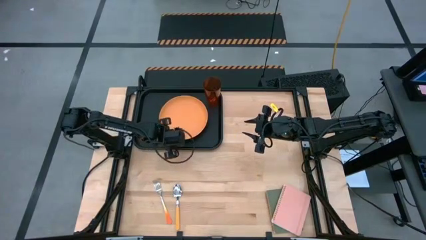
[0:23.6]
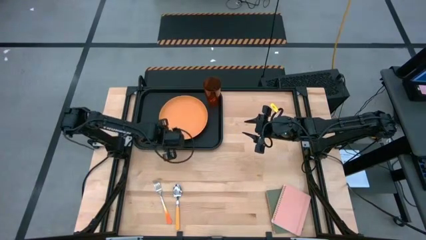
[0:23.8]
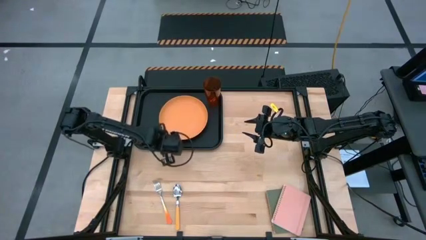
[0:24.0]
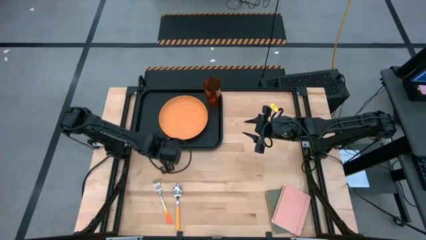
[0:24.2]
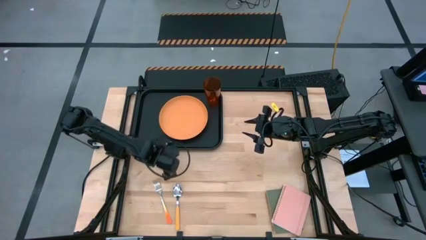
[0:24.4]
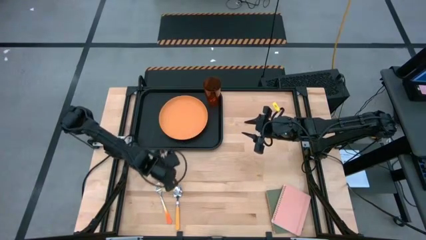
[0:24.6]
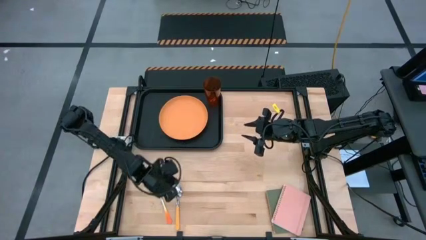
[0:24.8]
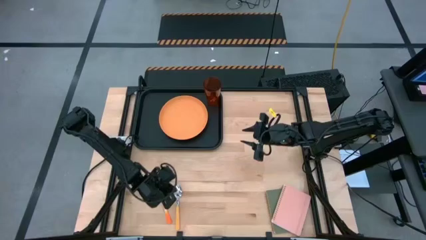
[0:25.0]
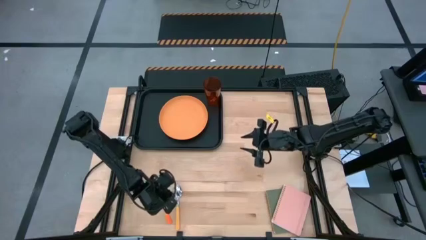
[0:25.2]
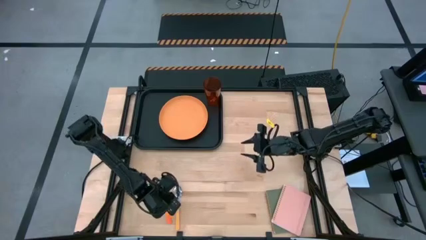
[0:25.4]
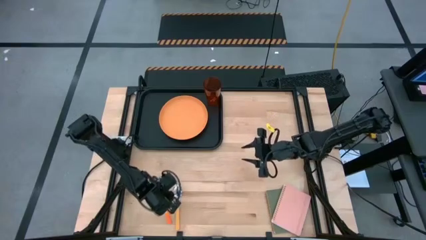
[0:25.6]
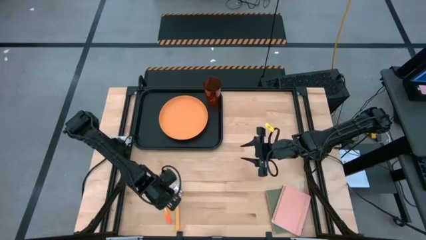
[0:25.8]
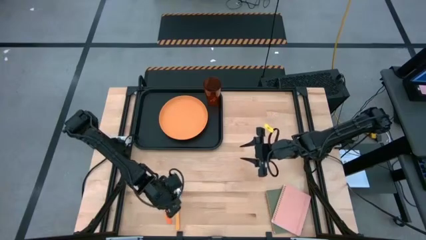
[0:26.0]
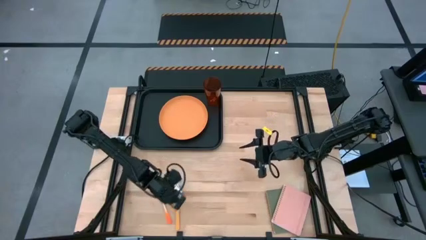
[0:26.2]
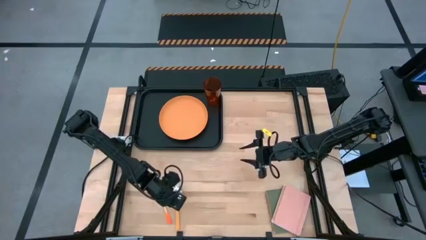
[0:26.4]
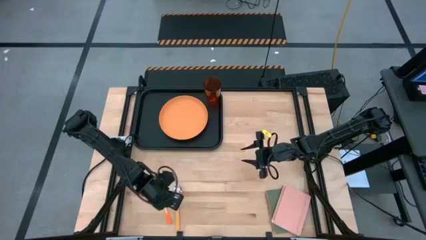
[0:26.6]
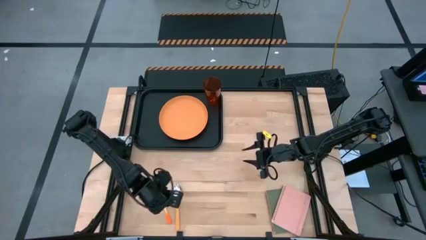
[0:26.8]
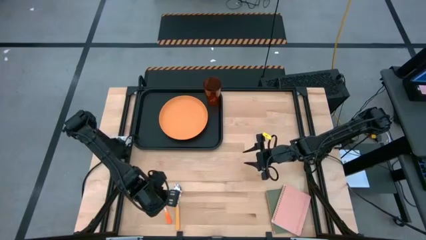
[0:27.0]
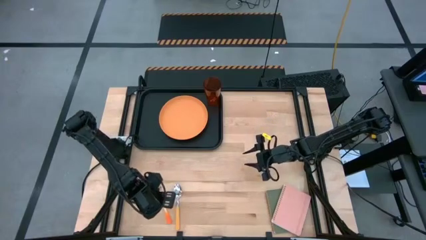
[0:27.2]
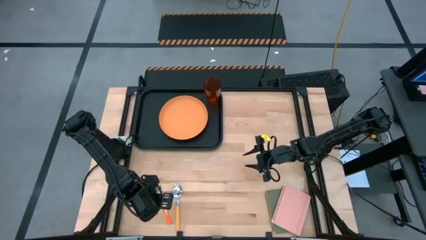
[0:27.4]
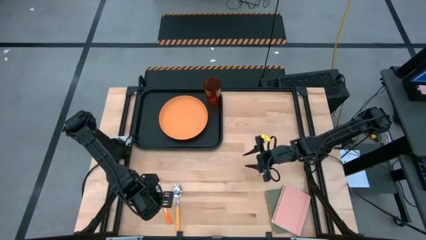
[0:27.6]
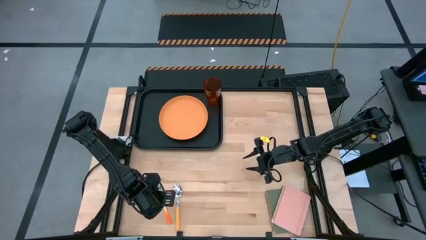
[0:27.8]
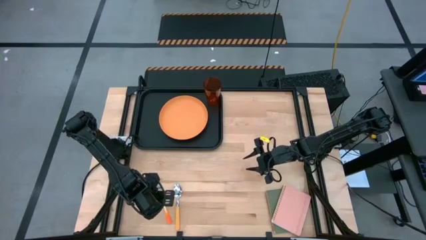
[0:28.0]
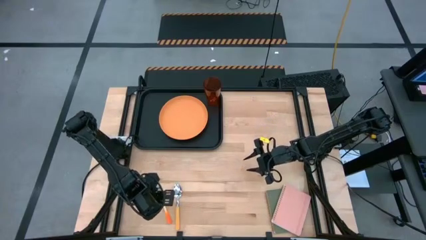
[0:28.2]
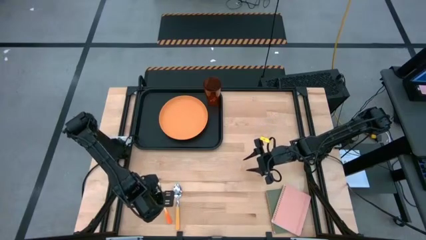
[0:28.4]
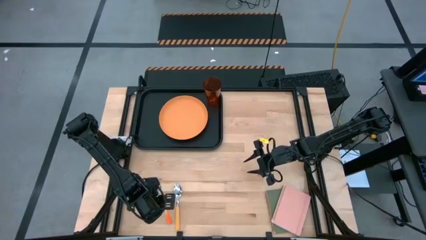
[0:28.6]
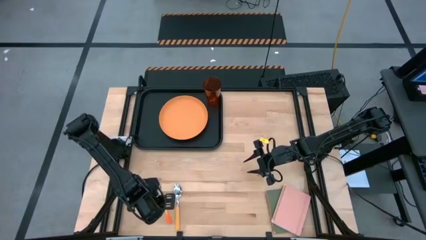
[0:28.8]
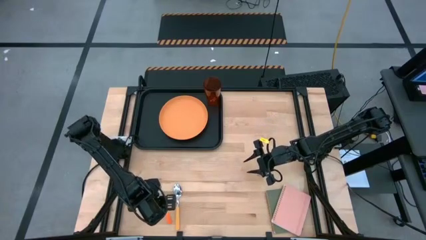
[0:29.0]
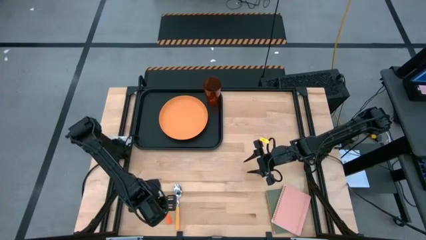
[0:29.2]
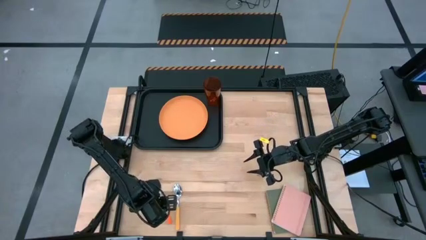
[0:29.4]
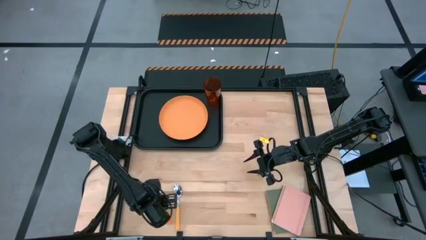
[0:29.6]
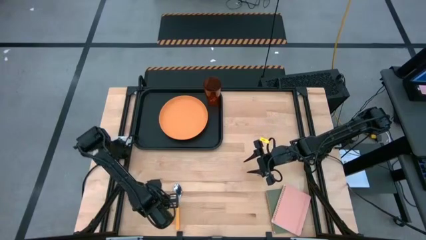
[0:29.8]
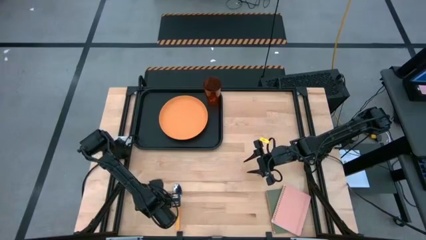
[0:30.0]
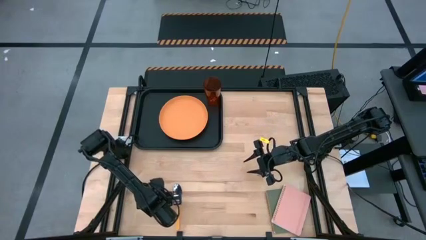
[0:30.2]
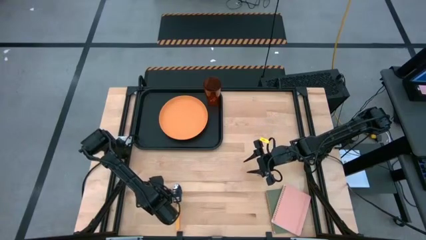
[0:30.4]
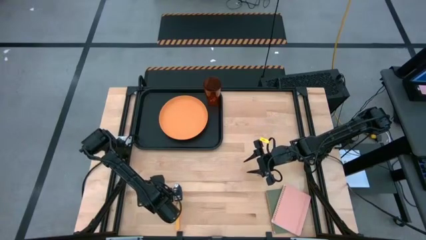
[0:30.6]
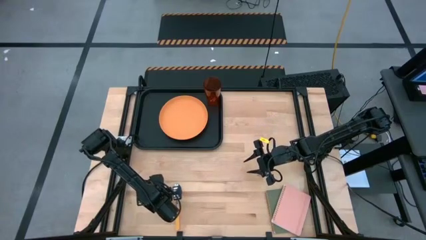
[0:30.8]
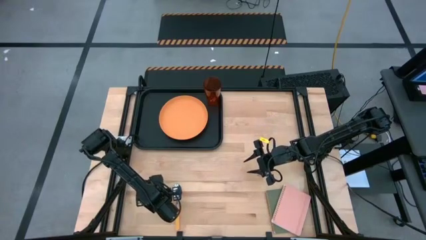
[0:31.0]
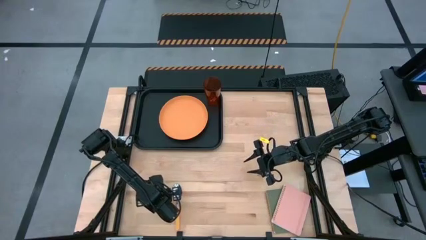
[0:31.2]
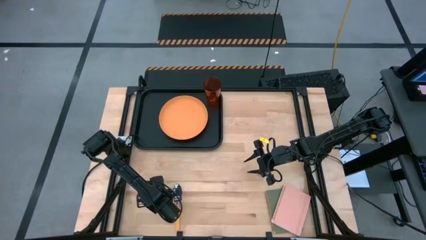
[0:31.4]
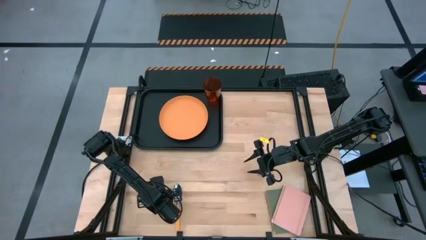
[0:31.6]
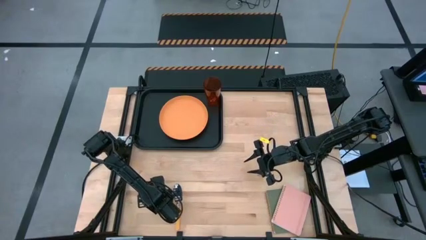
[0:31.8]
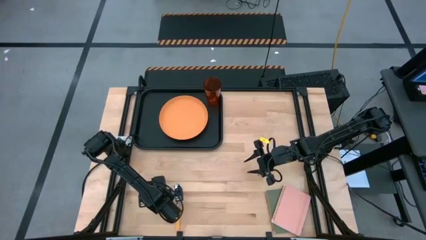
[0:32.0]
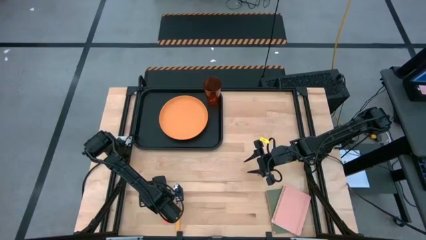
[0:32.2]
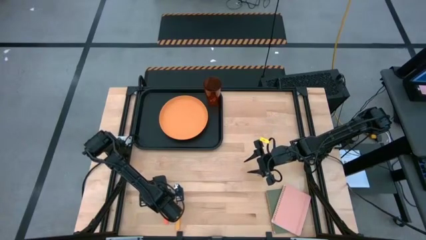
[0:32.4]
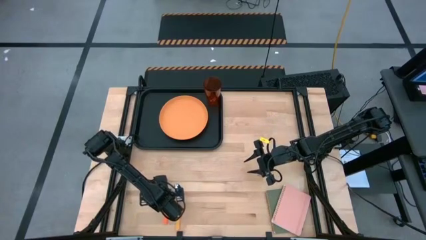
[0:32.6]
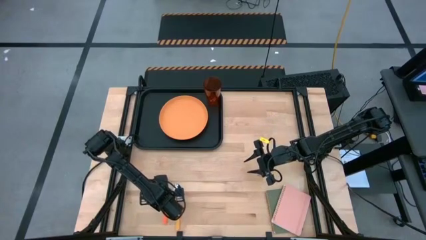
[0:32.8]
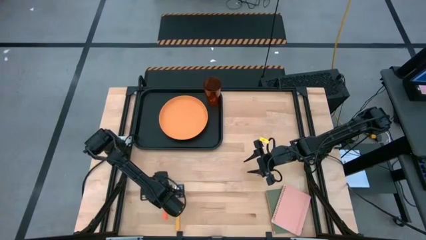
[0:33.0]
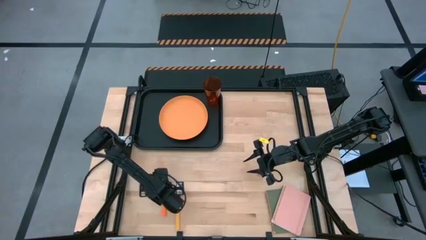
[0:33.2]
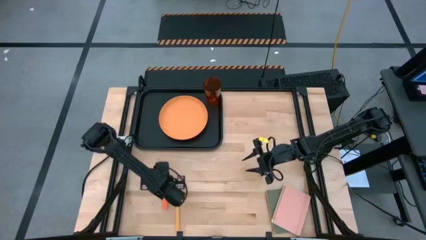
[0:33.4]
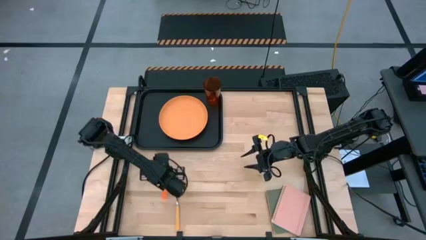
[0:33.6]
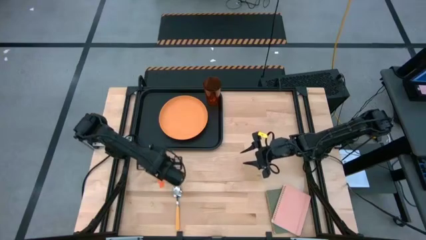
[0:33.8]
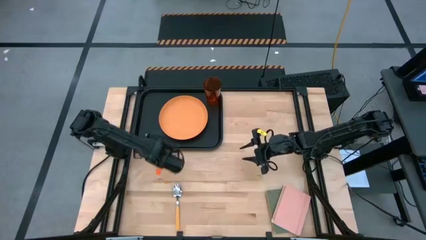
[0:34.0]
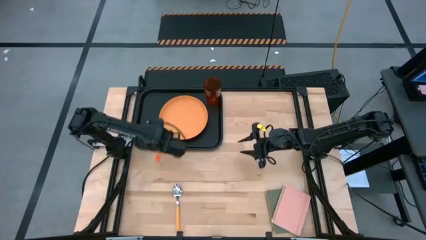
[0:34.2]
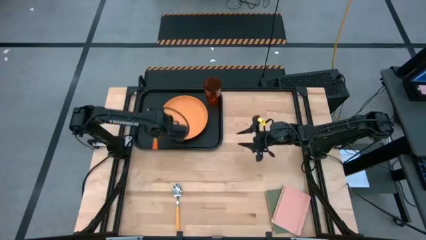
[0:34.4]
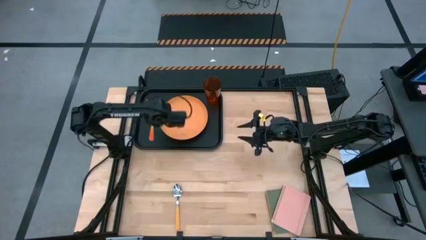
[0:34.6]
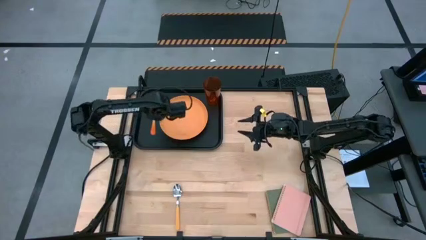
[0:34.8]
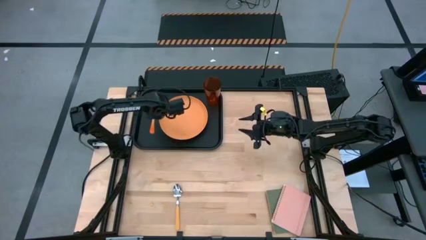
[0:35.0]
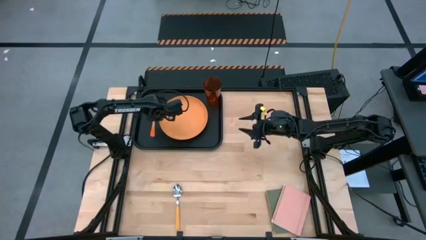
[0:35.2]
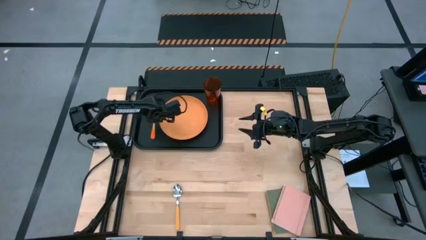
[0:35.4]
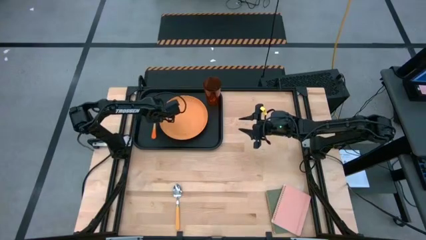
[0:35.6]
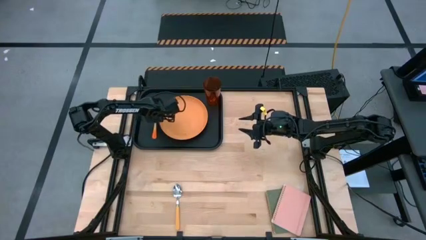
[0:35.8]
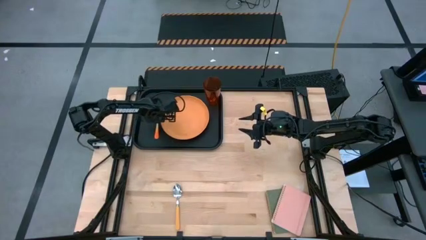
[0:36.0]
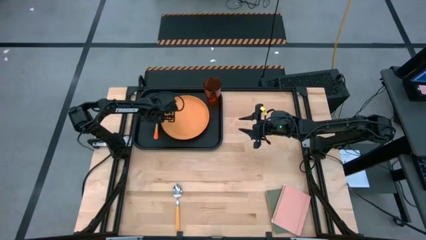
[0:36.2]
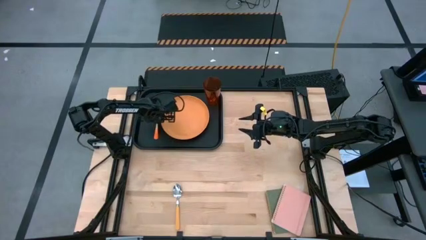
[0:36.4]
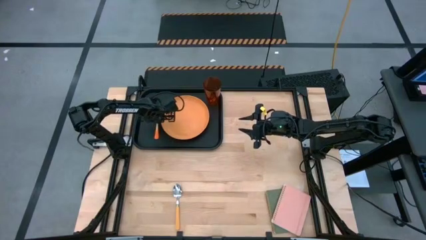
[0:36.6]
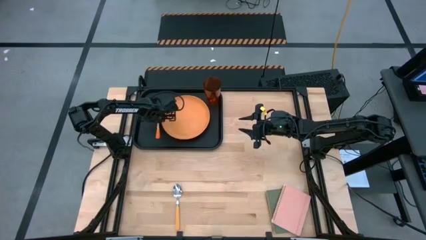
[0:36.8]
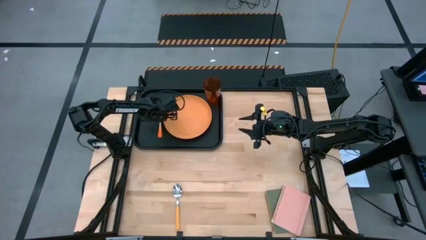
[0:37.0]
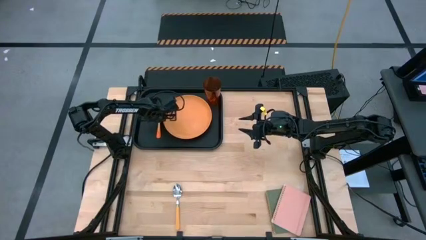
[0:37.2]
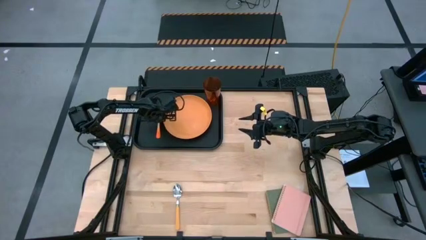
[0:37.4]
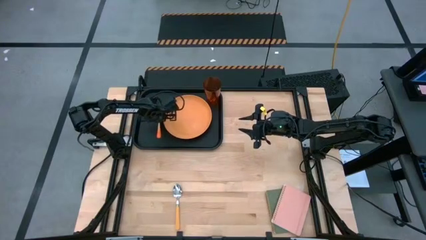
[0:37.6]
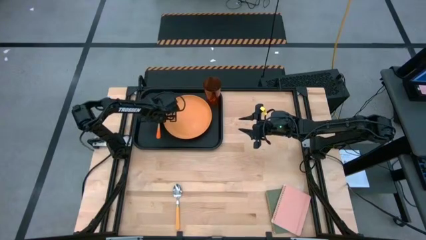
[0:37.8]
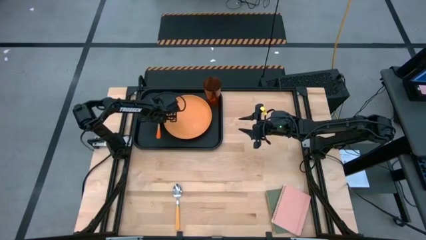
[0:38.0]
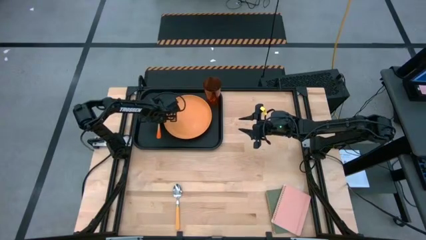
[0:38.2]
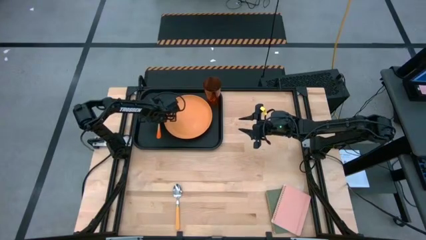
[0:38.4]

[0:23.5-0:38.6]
Task: Pick and place plate/cup/fork/spoon on tray
Put the orange fork on the black serving tray to the left of the orange plate
